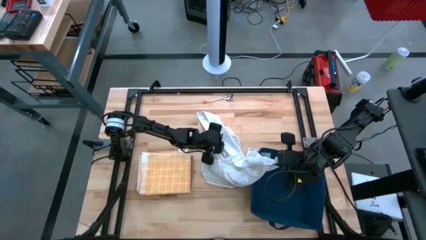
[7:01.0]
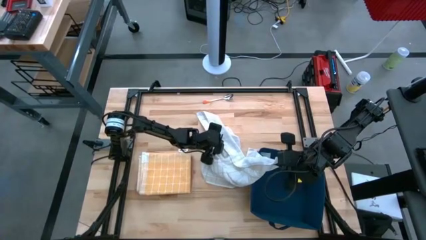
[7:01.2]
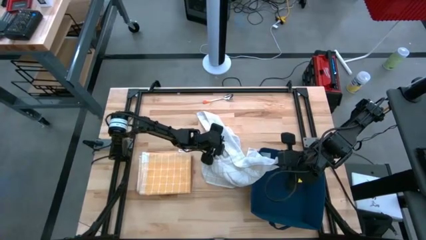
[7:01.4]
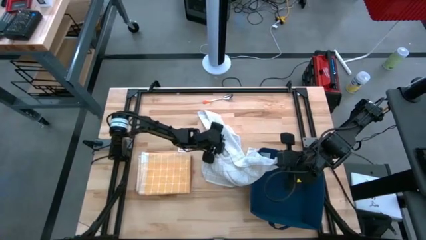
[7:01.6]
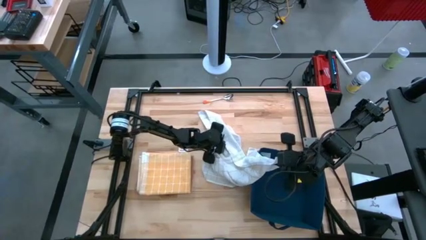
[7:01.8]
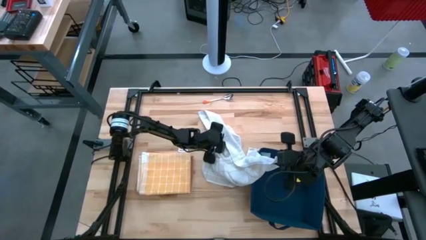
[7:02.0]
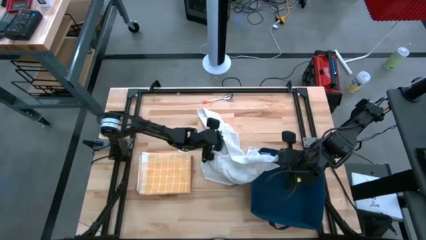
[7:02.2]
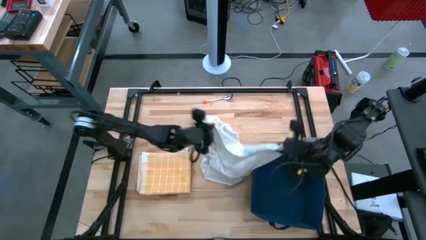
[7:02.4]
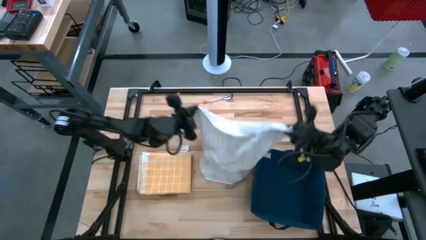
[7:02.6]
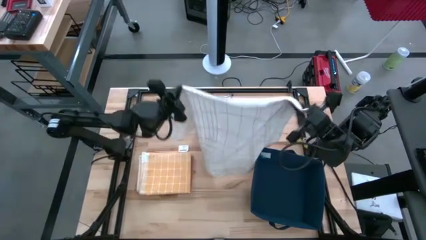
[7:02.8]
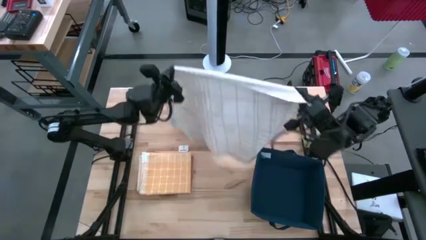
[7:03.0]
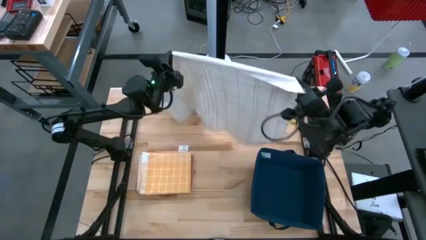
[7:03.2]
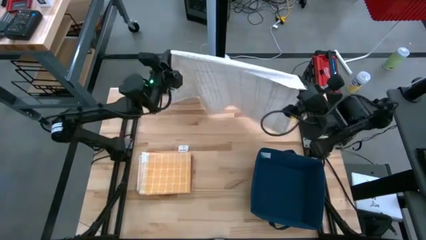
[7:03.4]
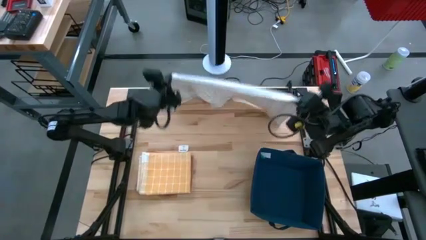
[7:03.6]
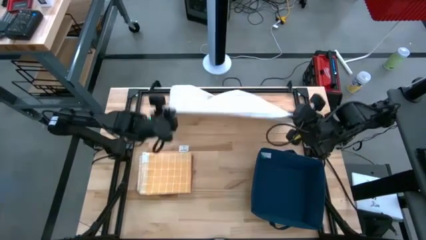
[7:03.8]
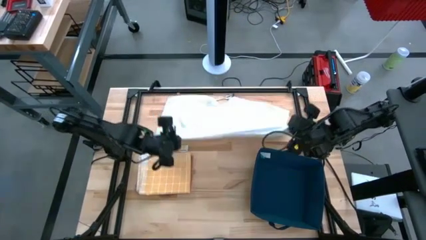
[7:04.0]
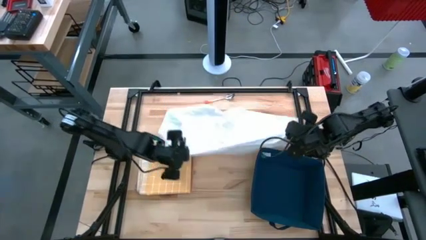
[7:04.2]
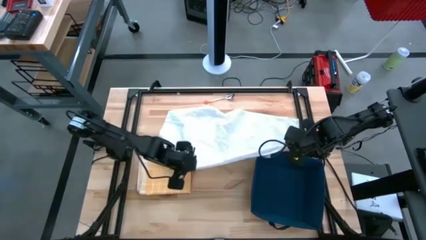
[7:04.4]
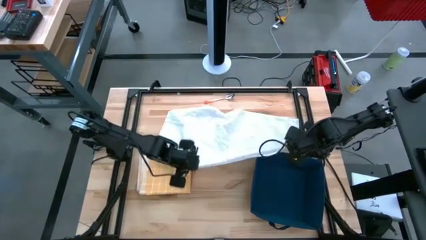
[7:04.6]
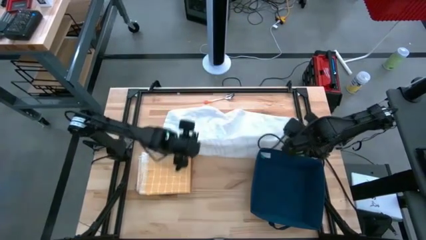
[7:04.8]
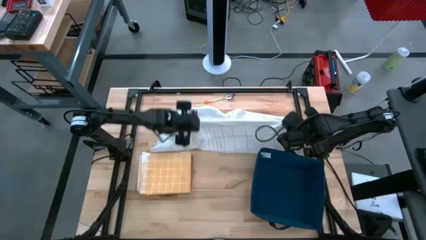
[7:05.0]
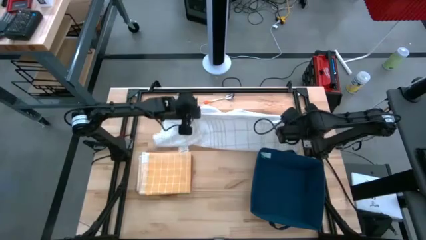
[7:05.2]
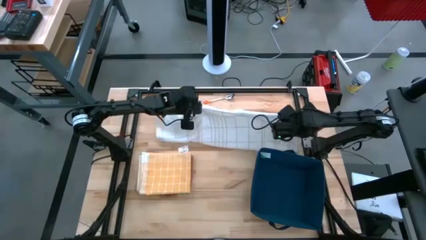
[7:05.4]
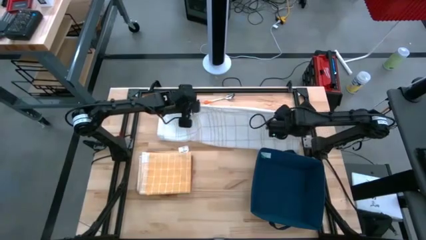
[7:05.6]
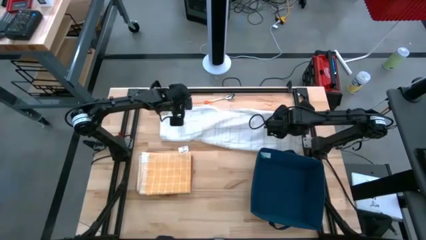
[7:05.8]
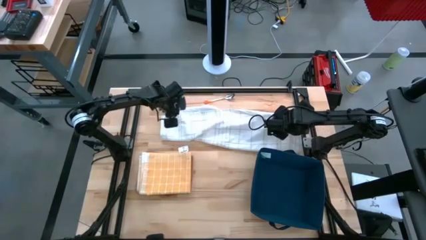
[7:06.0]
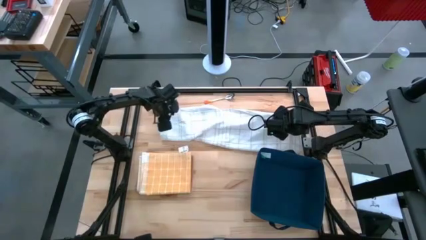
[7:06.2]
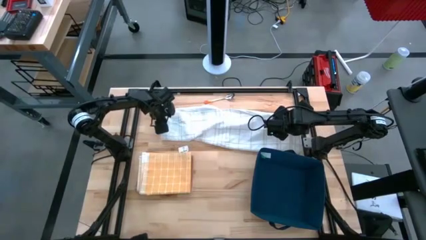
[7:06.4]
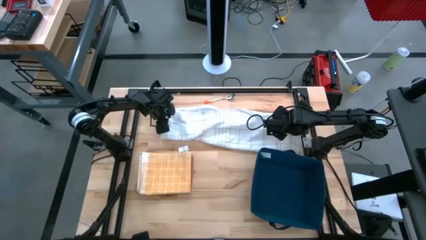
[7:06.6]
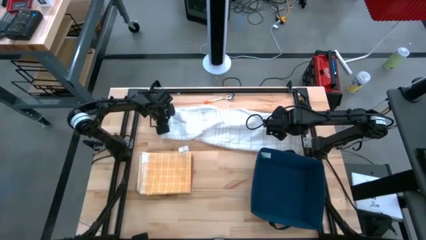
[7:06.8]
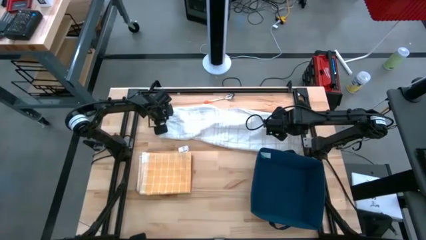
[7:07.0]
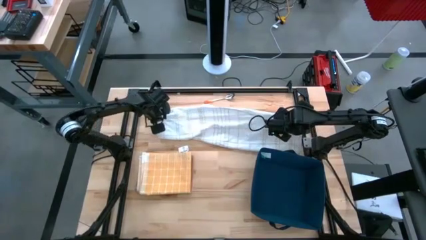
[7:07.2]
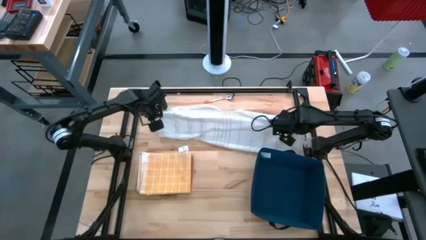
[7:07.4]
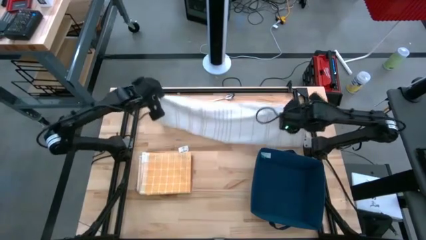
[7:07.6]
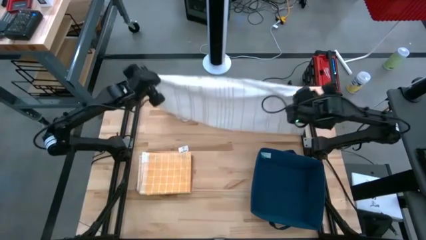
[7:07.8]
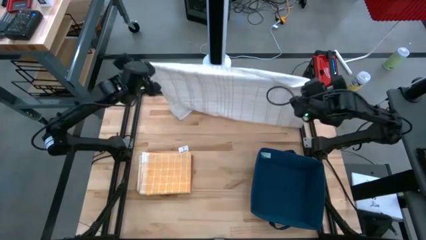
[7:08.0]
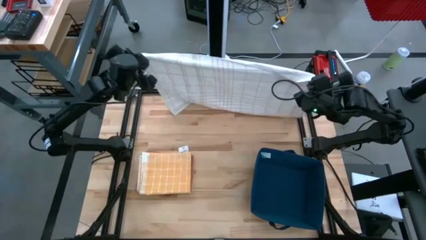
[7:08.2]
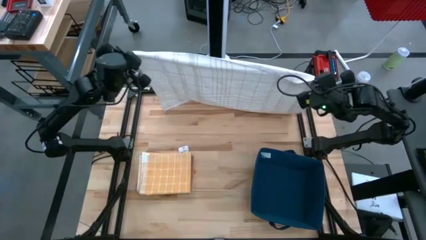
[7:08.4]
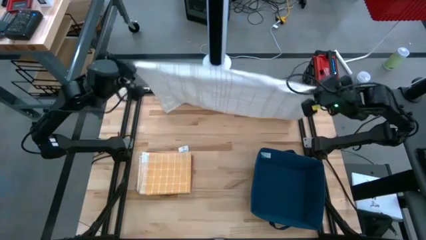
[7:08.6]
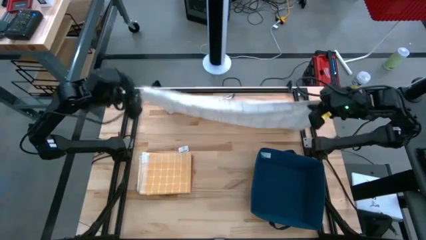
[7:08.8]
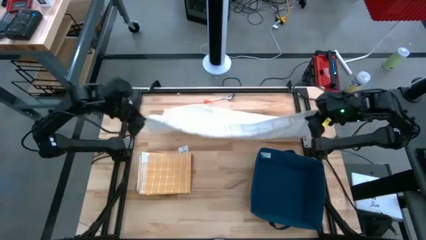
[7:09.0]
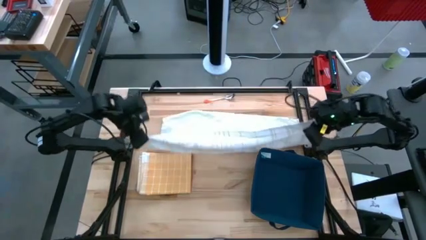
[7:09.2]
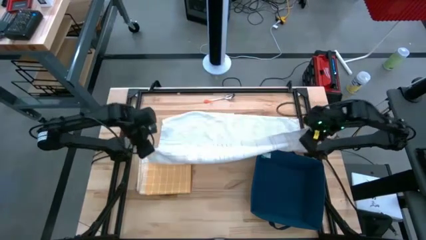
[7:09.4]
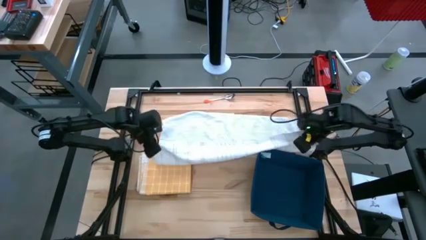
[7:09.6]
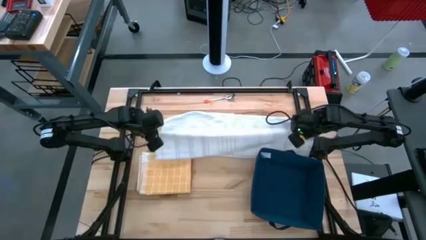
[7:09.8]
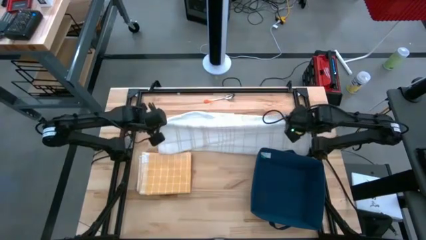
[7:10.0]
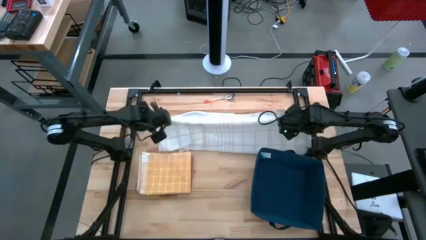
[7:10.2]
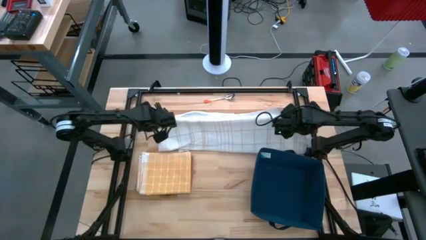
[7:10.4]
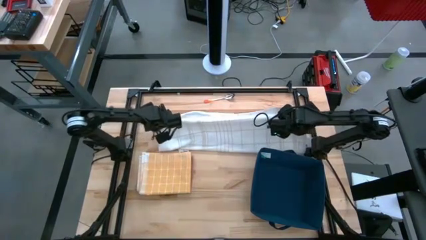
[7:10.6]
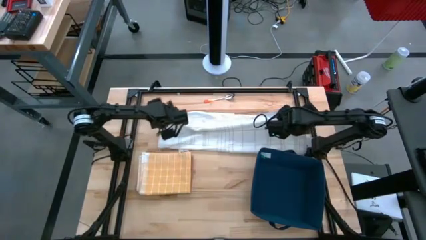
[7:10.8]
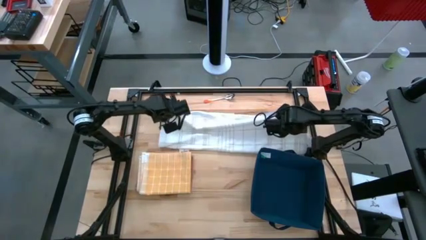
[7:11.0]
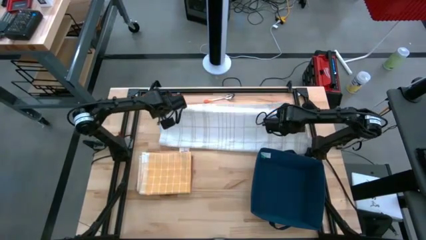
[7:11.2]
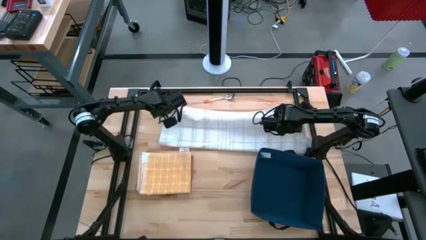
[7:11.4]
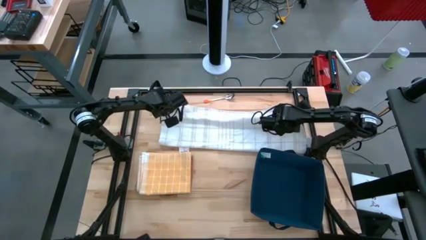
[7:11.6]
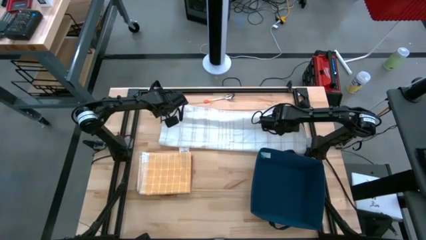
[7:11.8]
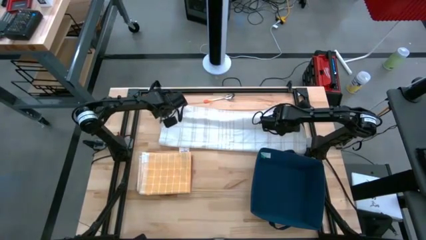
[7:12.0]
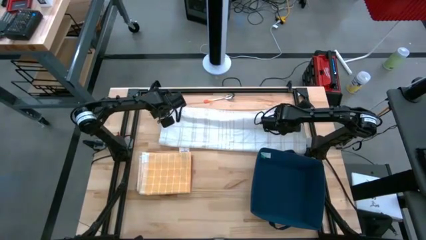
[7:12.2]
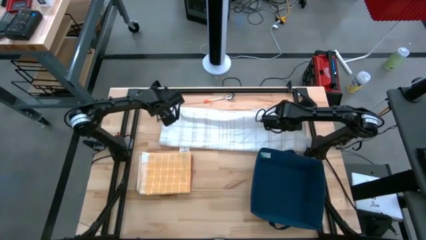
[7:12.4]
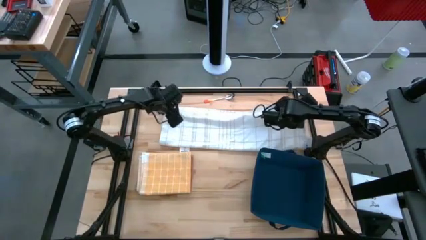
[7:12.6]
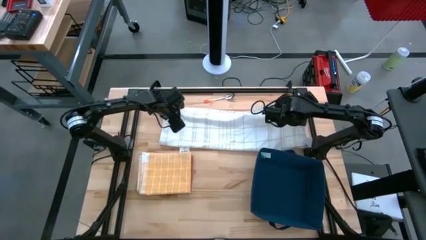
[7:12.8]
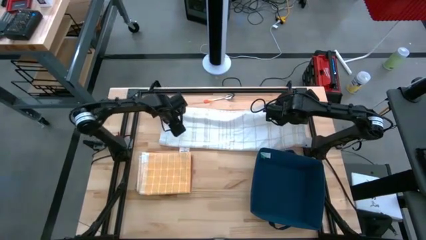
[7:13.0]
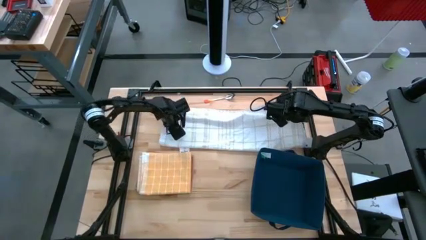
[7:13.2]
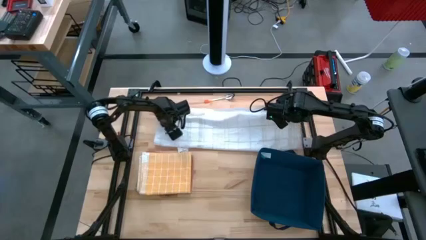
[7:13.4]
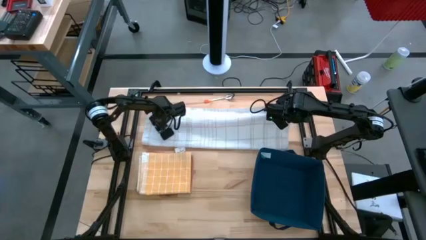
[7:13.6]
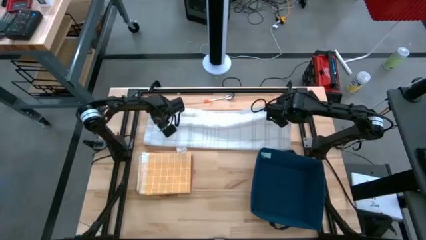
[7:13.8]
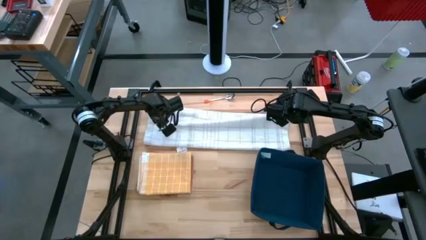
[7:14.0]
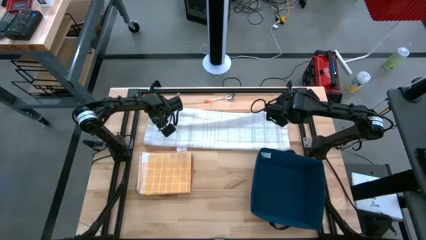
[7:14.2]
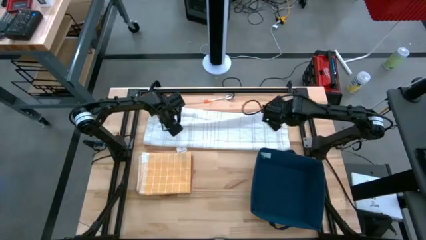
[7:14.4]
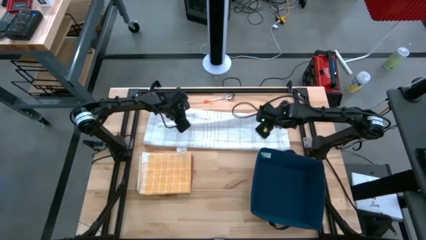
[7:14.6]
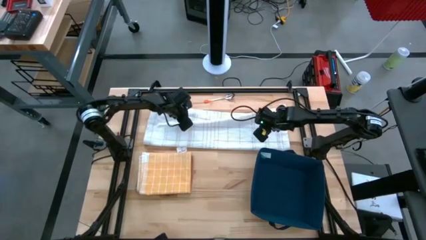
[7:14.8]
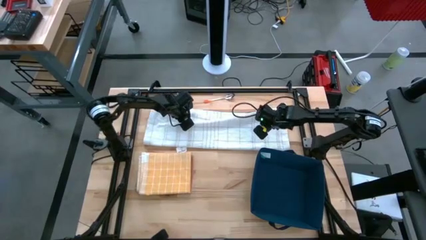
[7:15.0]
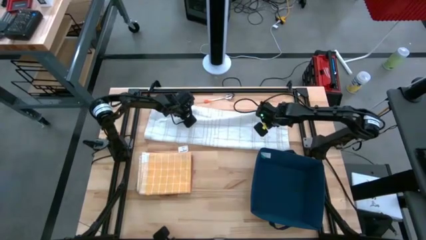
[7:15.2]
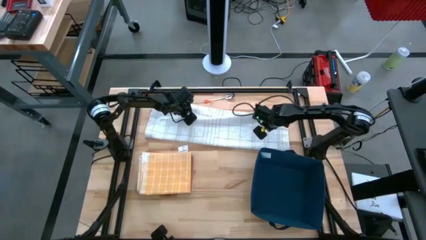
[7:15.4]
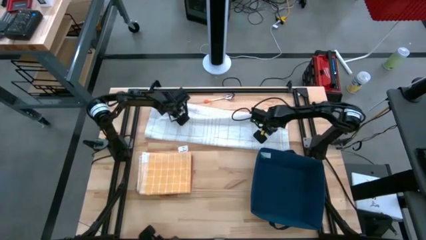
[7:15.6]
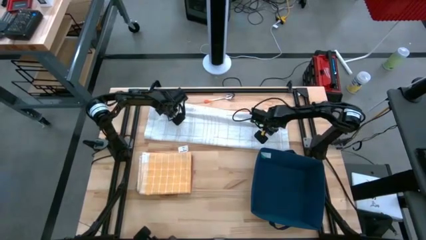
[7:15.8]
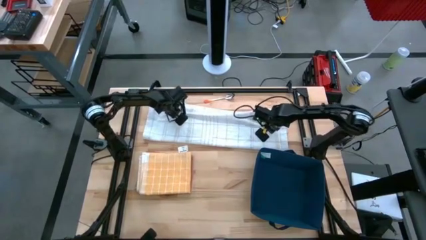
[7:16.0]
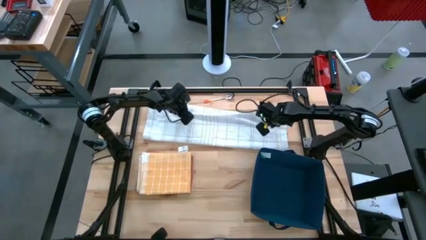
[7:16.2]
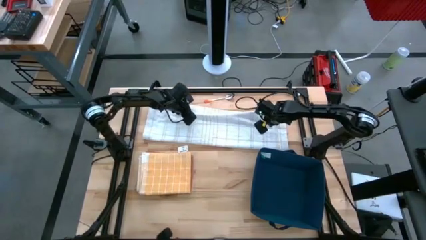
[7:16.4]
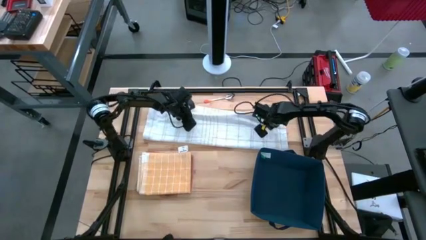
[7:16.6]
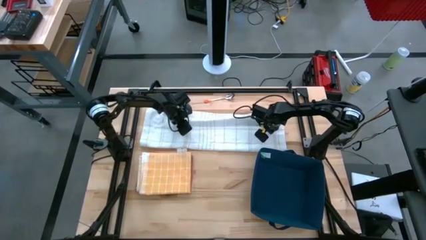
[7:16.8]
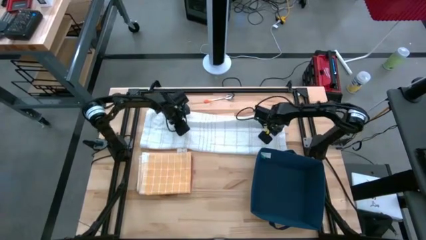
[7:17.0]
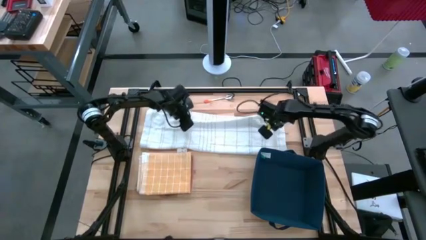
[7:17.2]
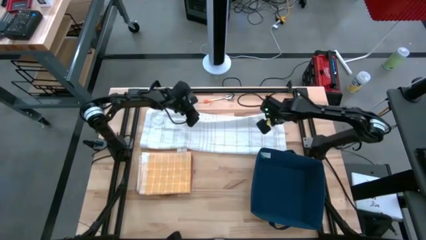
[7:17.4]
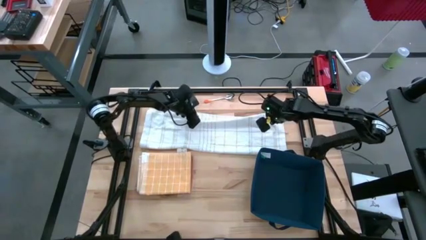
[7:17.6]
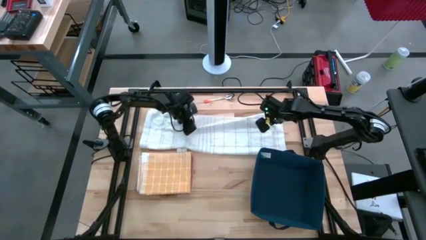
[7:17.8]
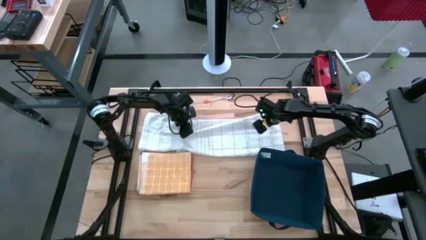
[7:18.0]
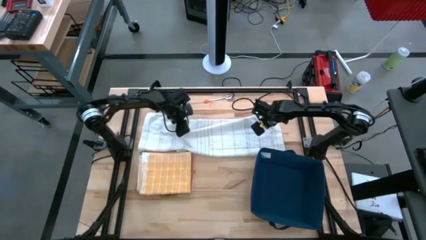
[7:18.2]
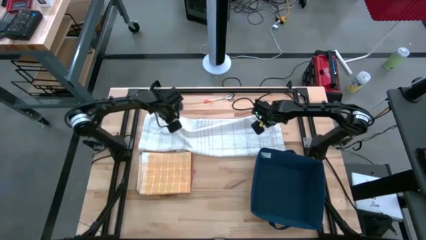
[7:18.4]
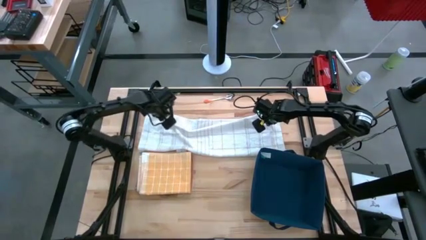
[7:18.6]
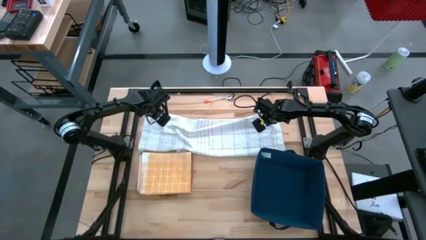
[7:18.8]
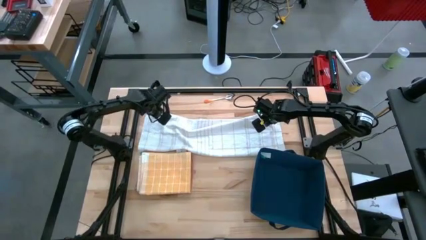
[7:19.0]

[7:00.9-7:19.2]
Task: Fold towel
Fold the white towel
